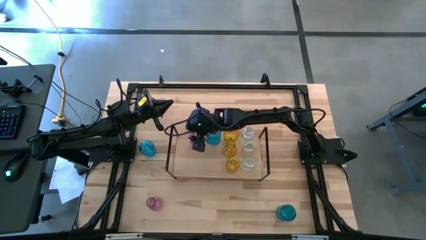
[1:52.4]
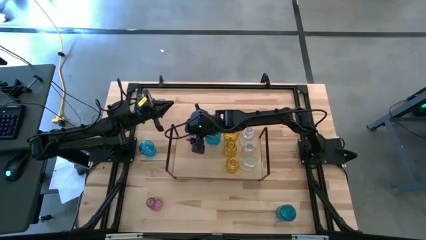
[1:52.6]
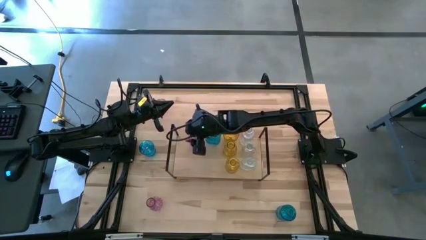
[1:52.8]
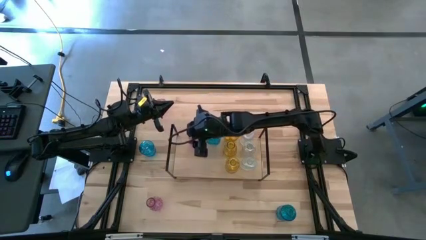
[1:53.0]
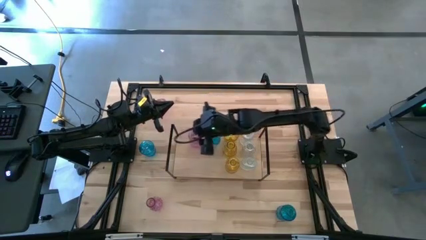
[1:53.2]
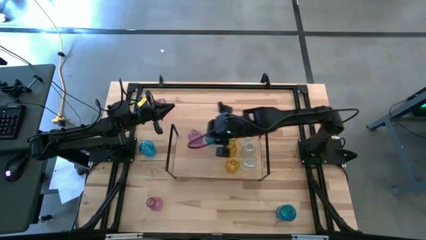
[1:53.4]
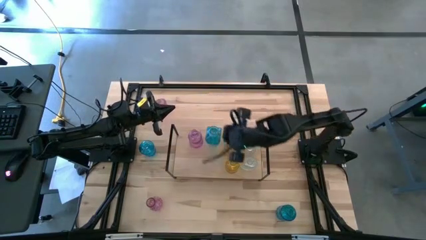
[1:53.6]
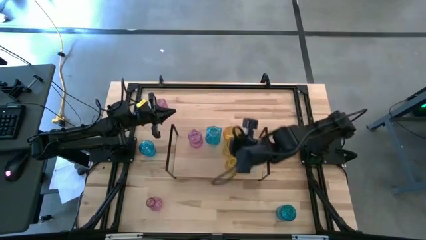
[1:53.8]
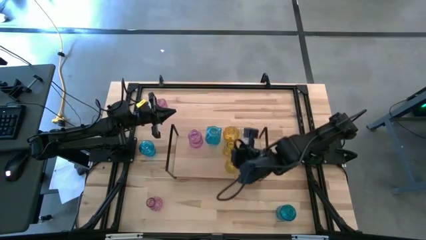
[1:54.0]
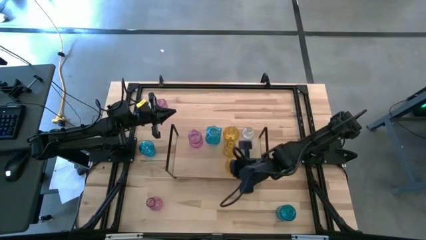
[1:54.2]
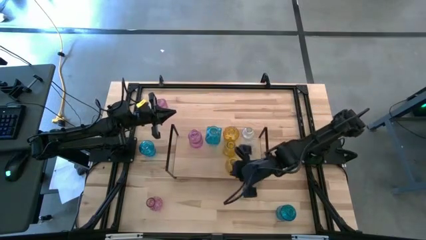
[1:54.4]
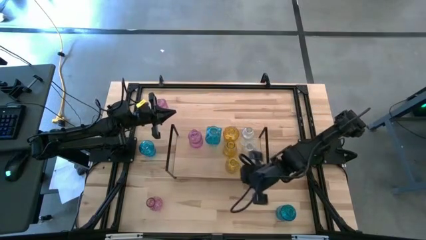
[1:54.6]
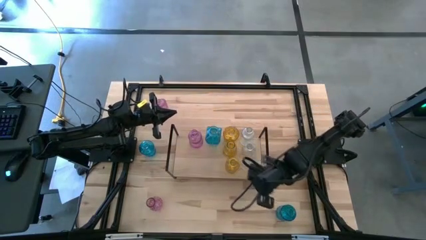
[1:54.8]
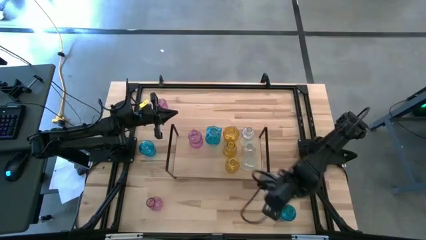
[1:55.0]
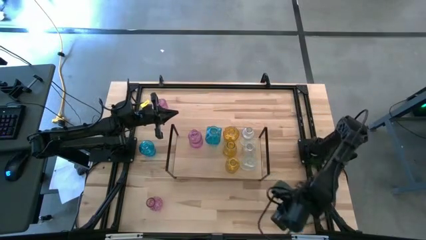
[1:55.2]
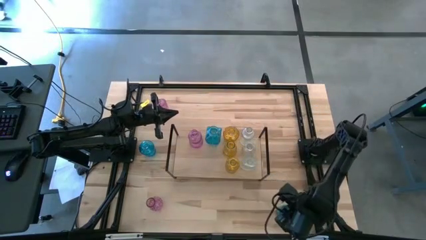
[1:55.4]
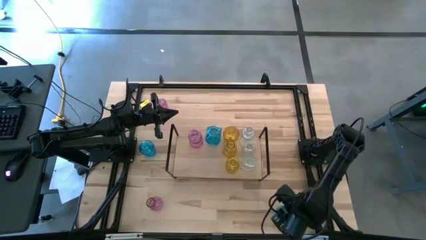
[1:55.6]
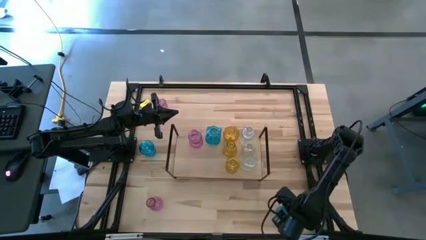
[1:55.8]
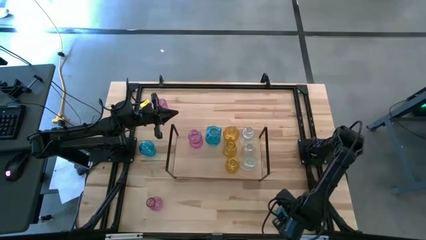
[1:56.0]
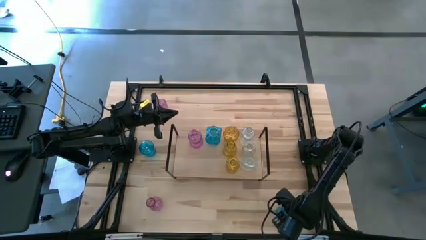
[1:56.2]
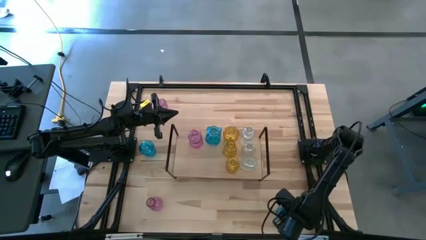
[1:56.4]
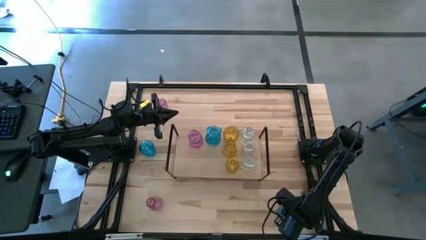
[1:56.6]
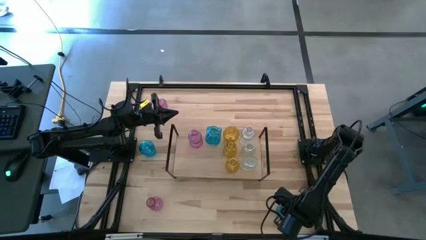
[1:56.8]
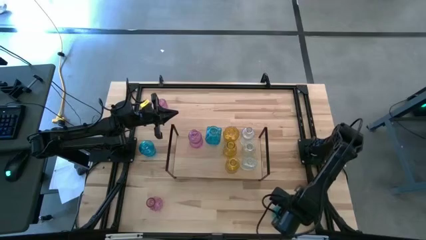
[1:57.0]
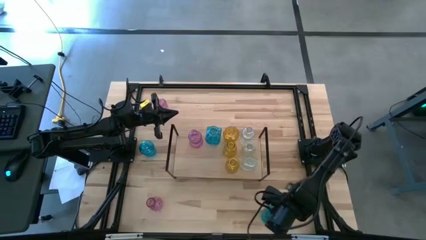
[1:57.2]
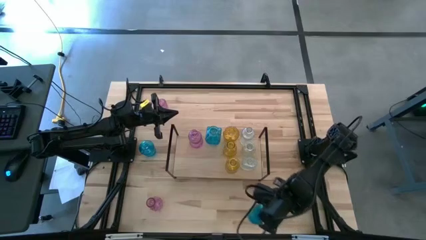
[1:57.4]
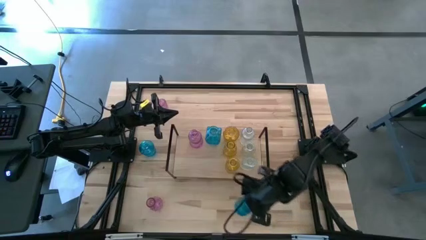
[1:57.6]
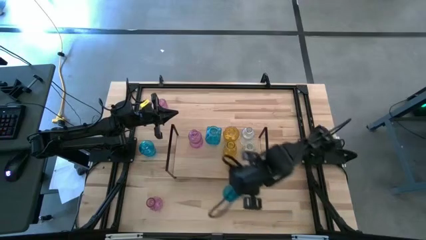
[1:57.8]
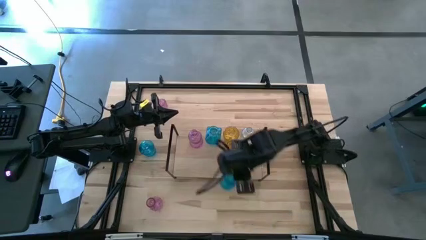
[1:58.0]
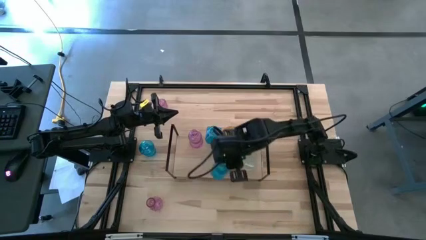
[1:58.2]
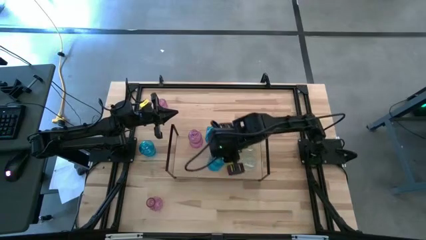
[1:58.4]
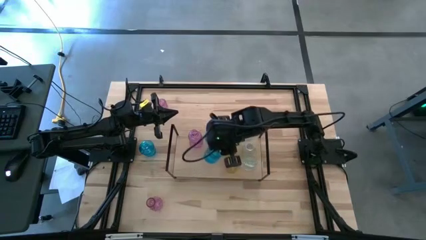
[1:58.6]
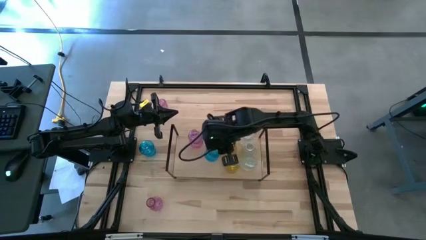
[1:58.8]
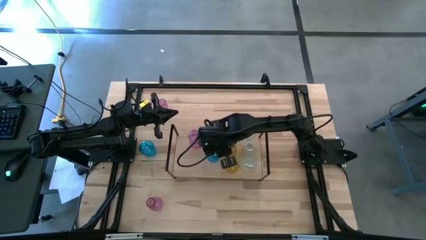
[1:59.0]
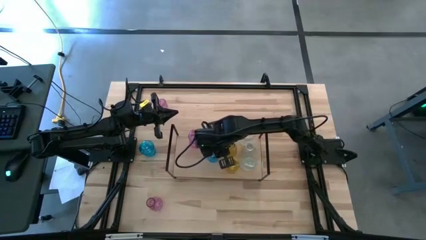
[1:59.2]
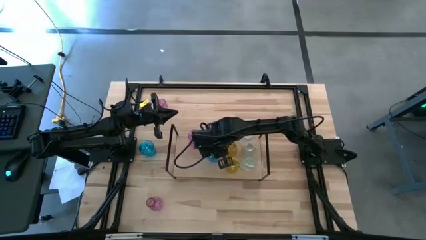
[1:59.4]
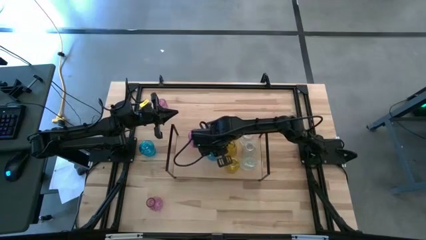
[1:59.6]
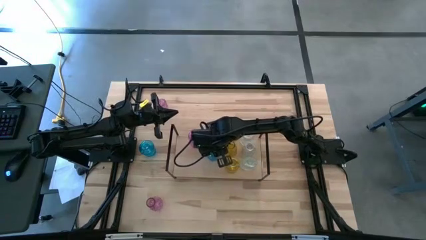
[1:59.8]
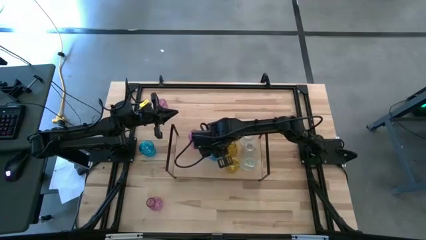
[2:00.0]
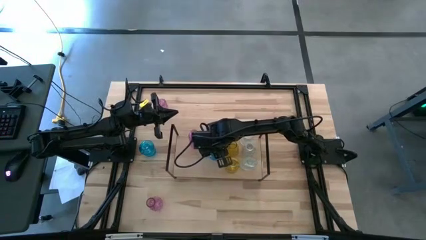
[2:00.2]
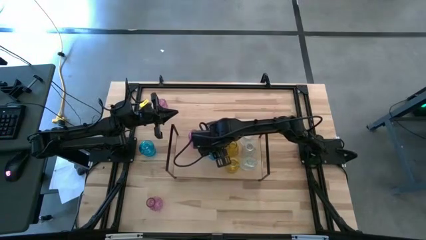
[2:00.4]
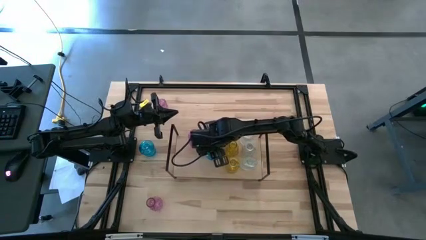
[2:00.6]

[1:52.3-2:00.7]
Task: sort vases onto shelf
Put the bottom blue vase on the shelf aligned with the other blue vase

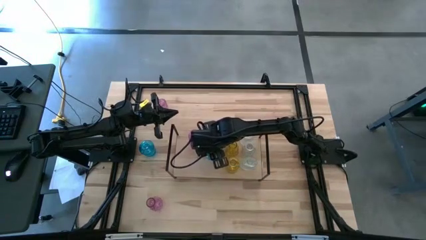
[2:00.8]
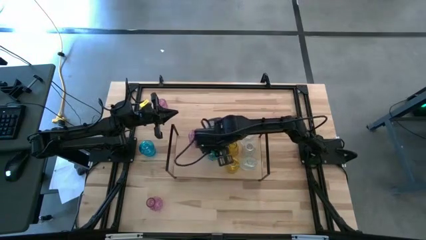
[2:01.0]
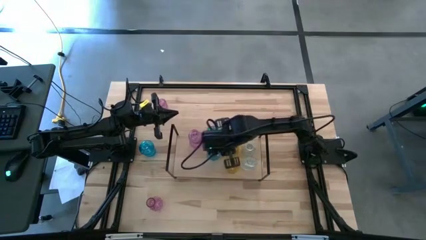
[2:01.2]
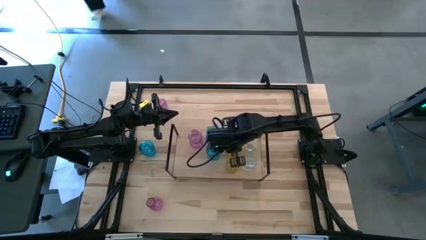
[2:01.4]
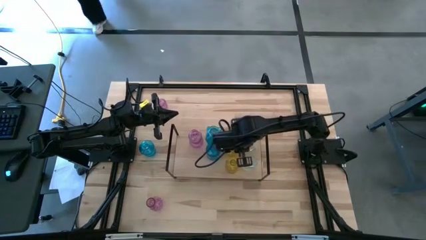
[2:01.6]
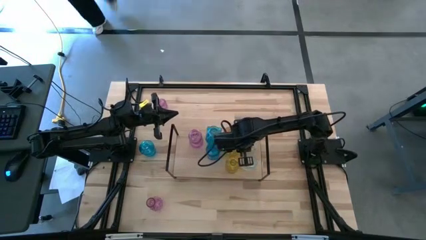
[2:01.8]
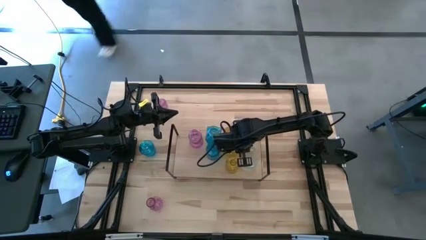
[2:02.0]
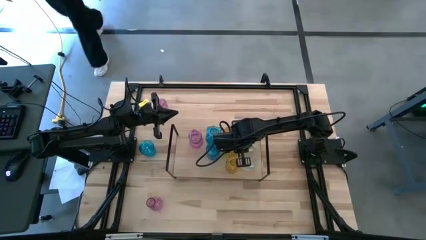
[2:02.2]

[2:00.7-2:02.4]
Adjust the yellow vase on the shelf

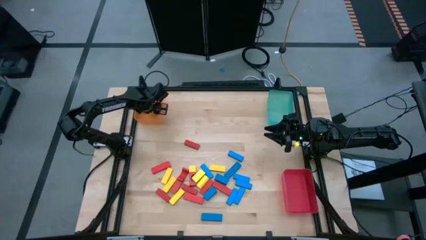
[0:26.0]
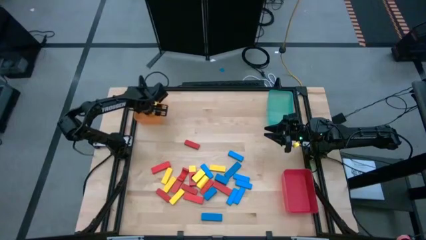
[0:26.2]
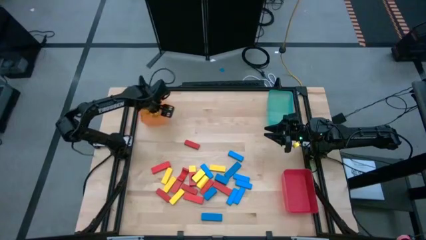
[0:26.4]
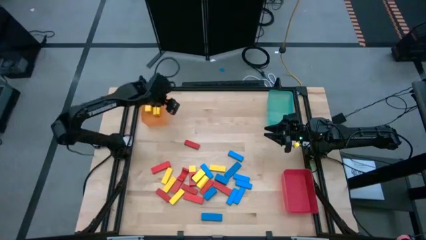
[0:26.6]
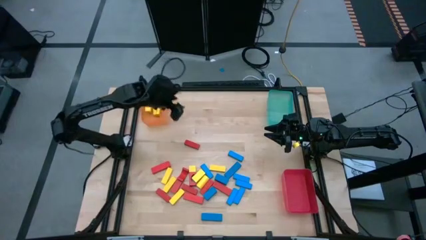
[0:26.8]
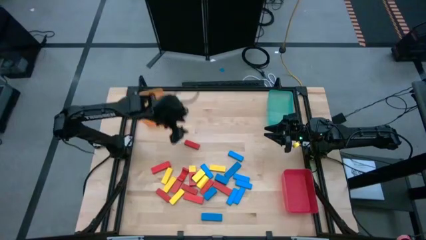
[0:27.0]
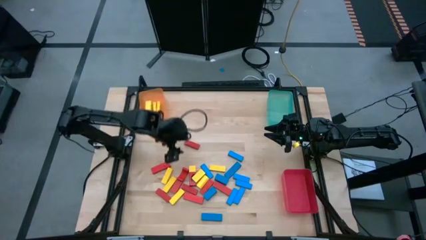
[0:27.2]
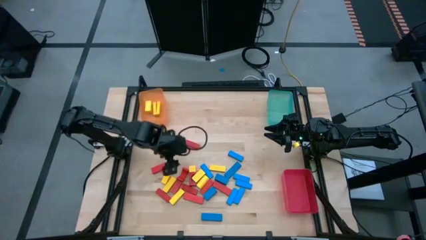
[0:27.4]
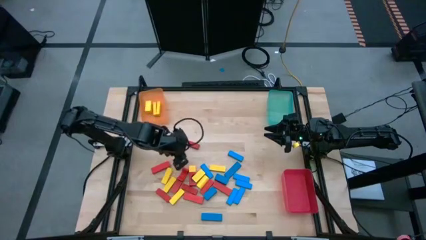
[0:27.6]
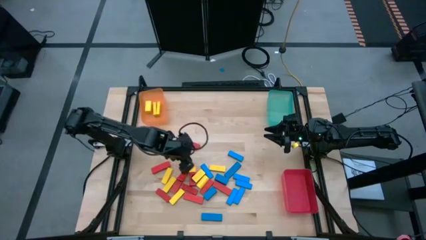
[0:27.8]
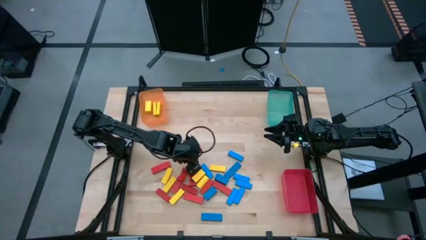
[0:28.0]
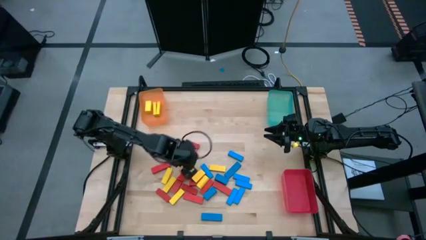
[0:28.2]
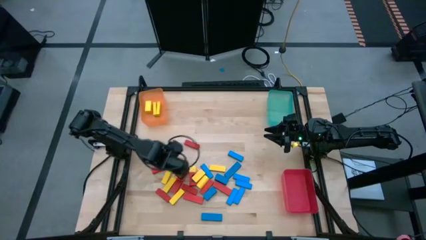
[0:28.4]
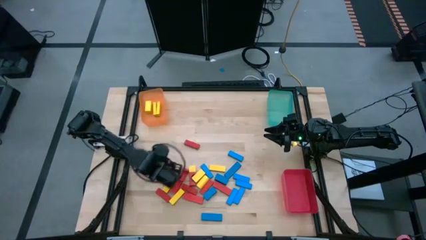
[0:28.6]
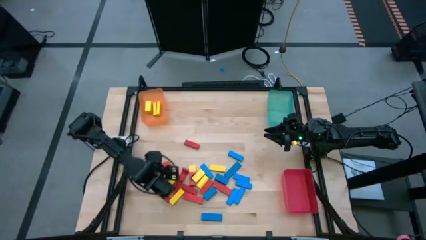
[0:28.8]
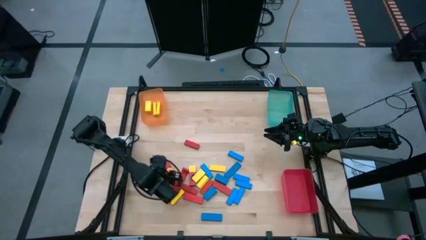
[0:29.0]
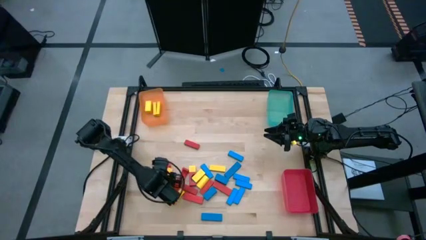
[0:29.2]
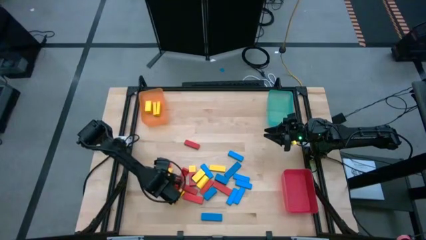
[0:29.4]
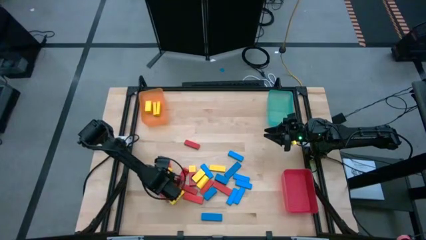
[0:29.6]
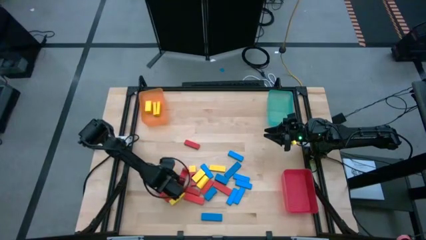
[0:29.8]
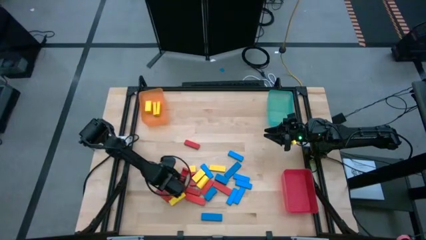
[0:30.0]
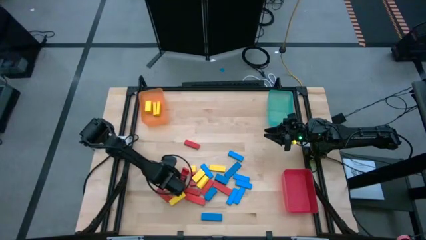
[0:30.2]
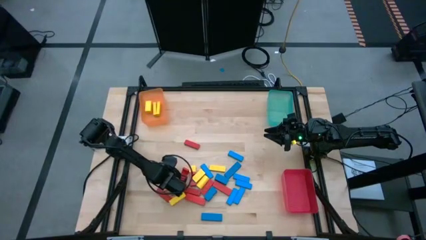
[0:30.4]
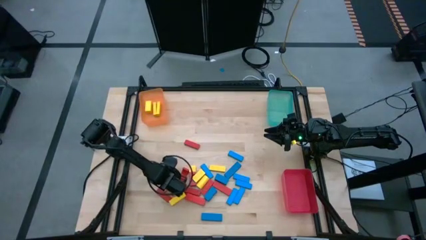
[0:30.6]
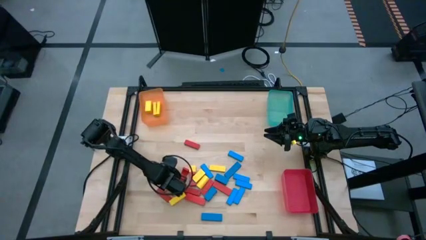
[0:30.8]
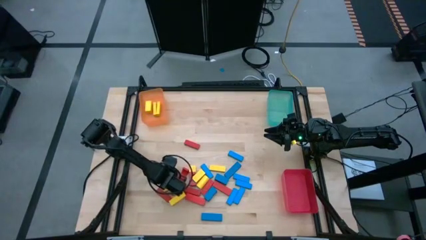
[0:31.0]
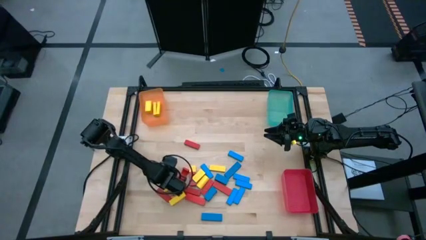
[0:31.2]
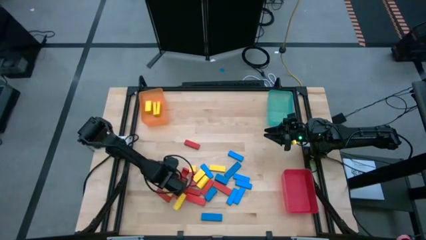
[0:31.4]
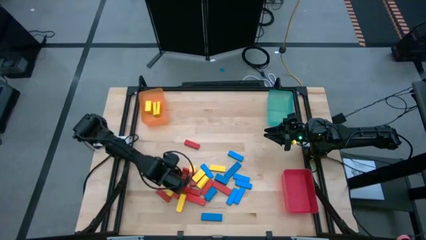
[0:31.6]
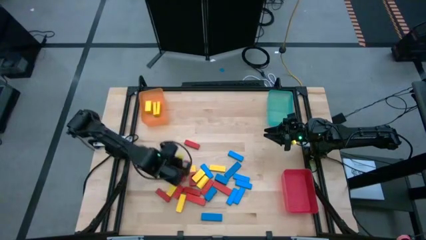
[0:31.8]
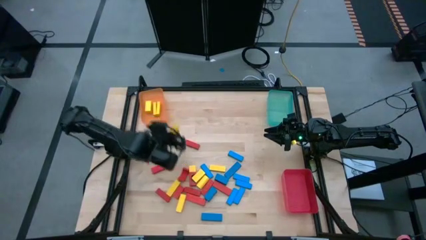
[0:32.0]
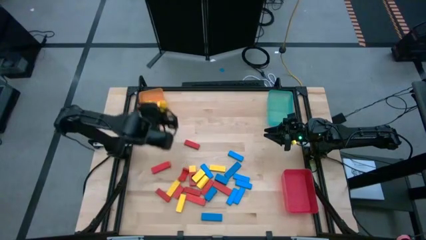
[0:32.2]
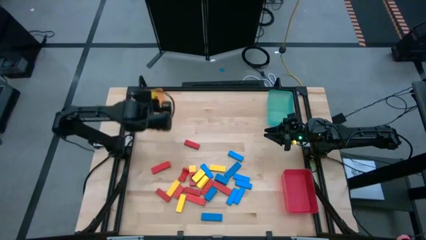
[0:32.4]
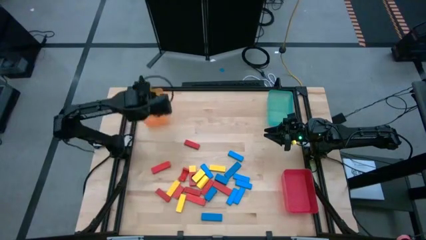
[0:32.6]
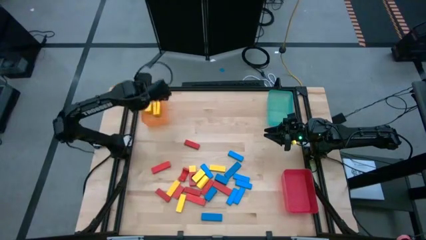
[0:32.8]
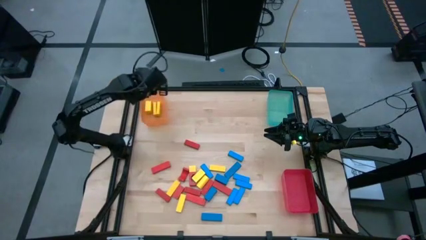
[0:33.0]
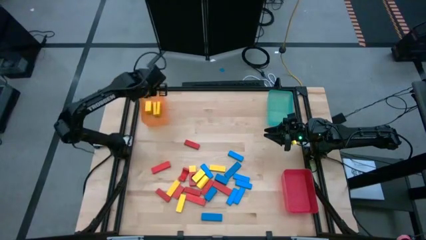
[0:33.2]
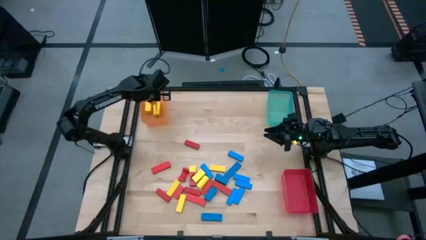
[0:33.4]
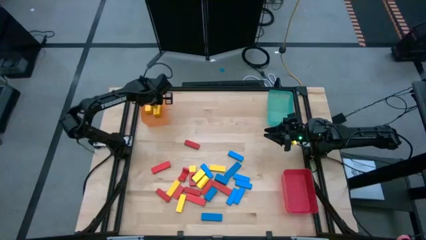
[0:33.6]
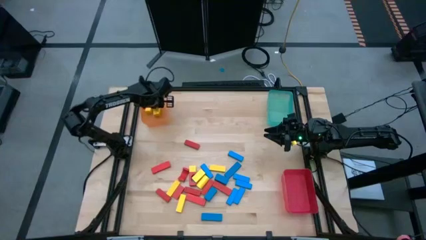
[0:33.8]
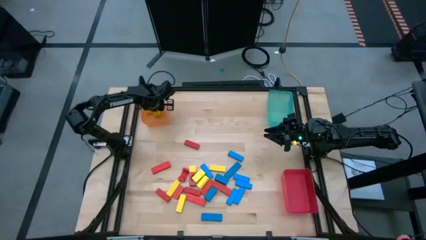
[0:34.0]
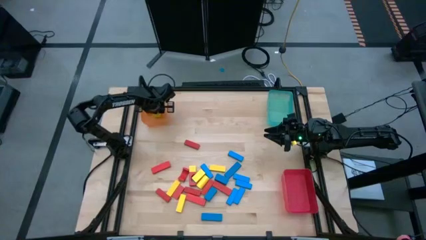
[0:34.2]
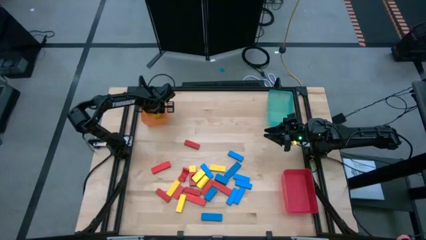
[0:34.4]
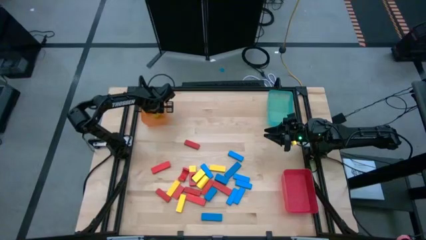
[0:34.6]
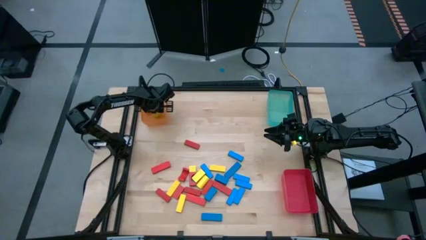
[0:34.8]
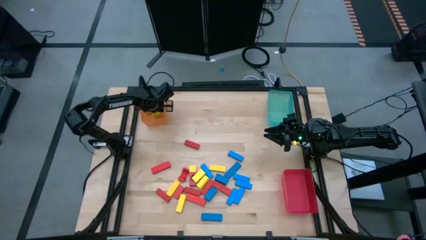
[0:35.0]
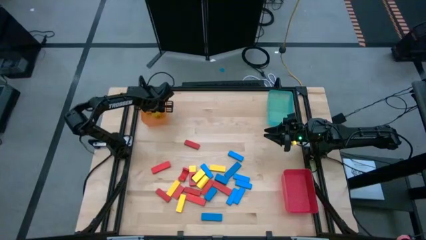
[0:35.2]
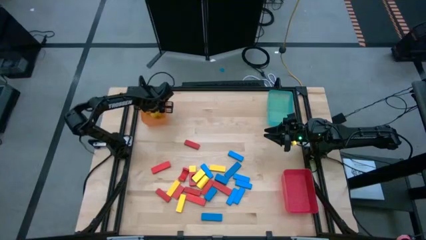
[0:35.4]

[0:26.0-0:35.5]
Task: Sort blocks
Put the yellow block into the orange bin
